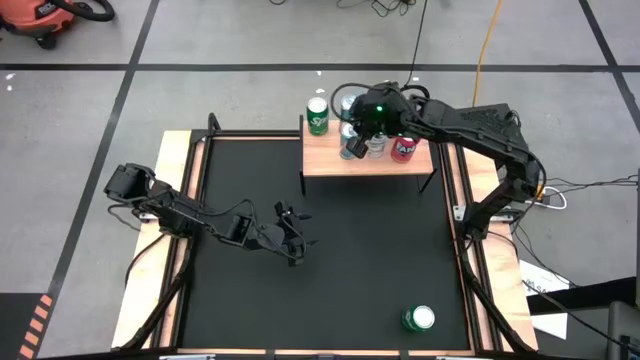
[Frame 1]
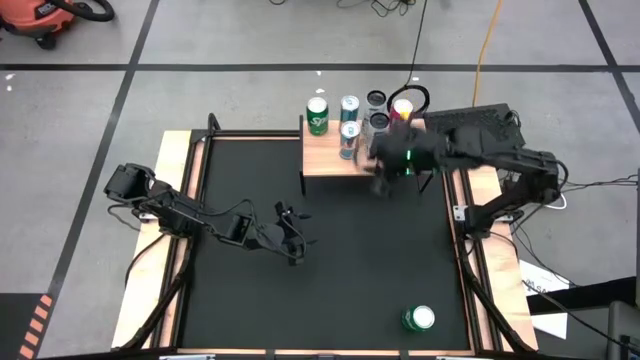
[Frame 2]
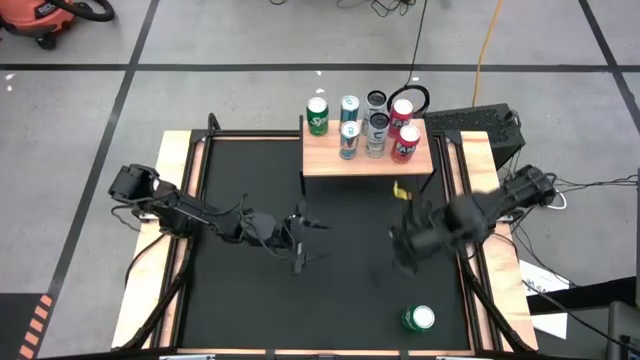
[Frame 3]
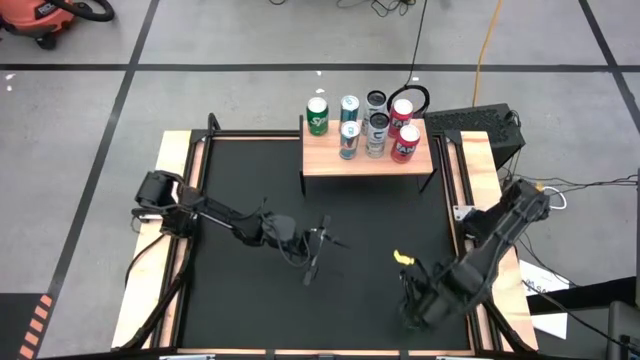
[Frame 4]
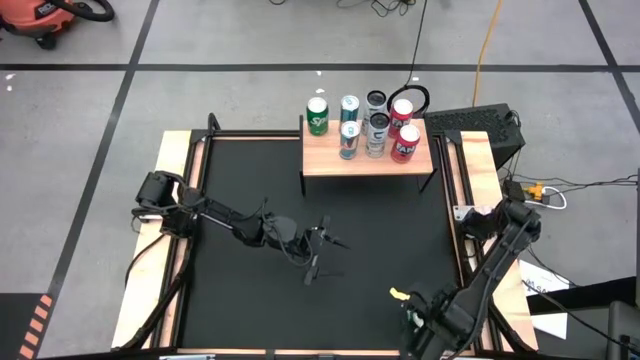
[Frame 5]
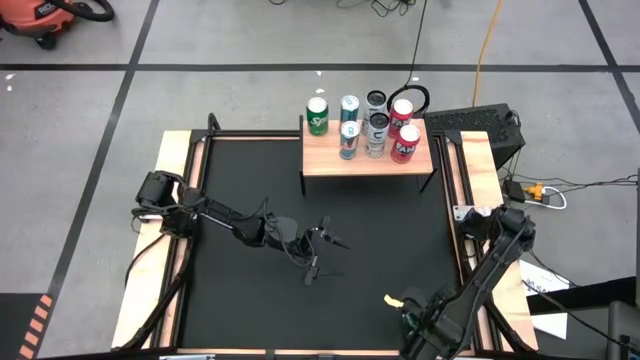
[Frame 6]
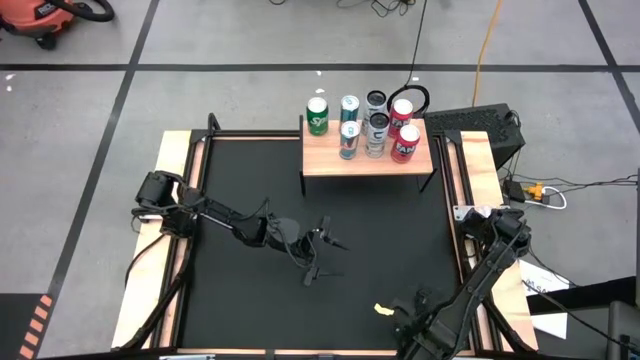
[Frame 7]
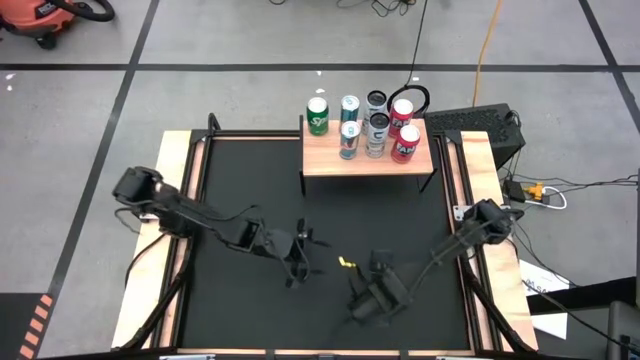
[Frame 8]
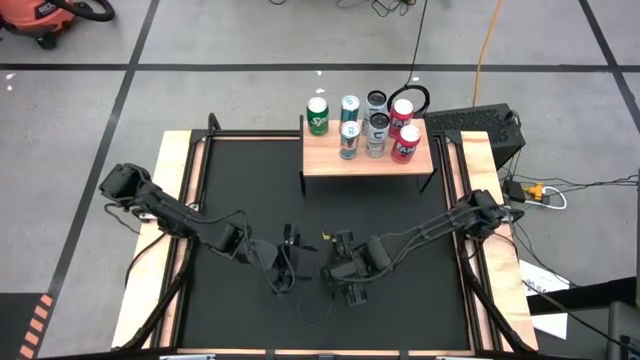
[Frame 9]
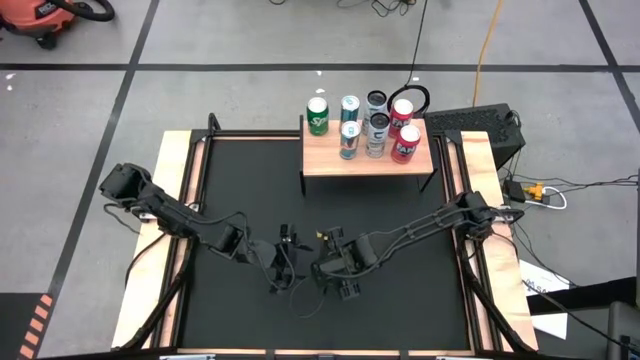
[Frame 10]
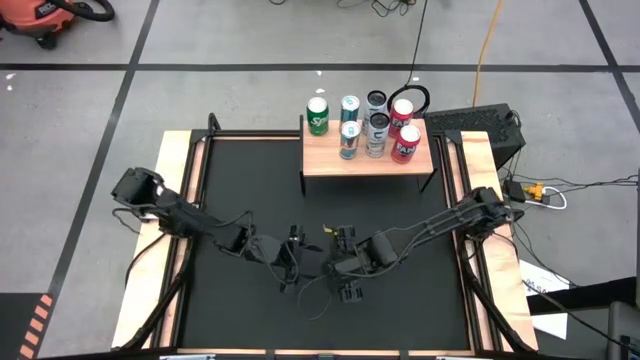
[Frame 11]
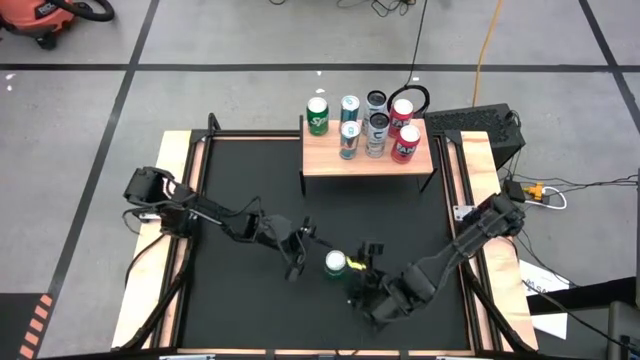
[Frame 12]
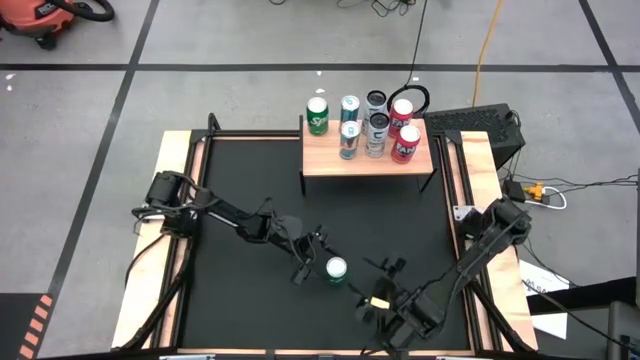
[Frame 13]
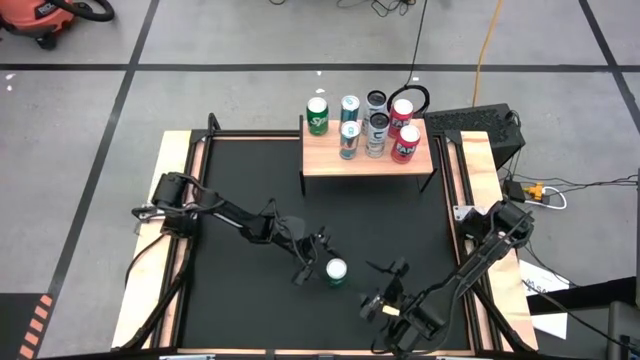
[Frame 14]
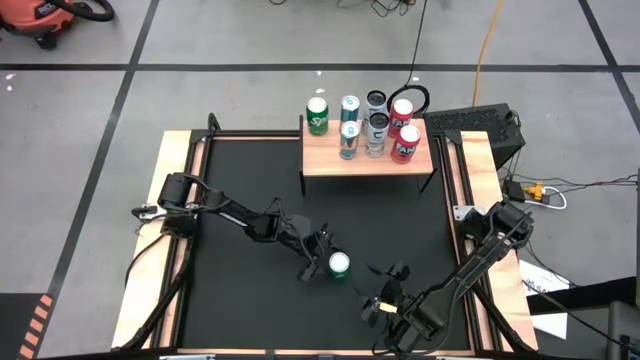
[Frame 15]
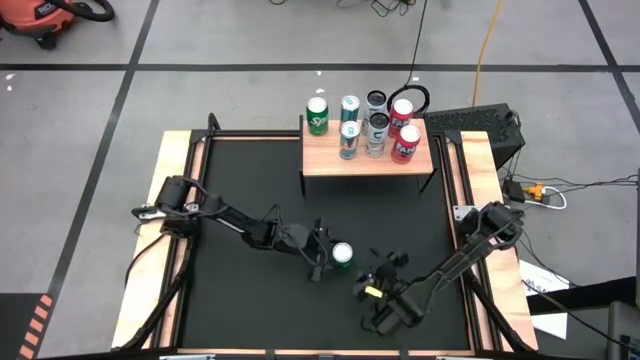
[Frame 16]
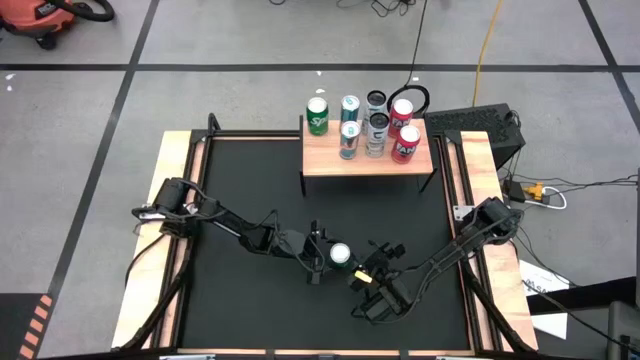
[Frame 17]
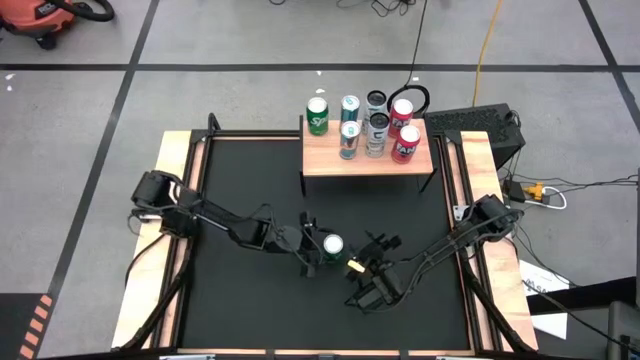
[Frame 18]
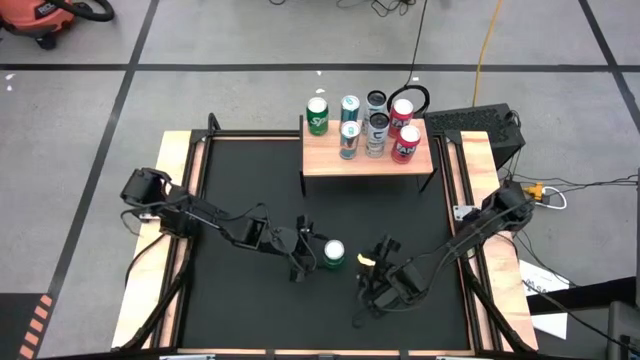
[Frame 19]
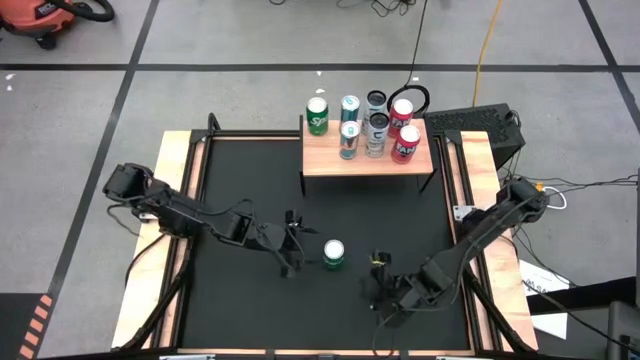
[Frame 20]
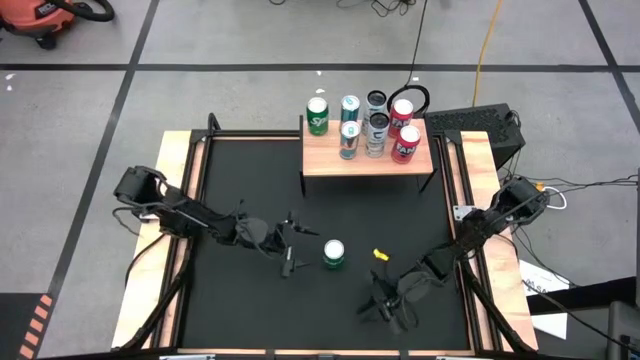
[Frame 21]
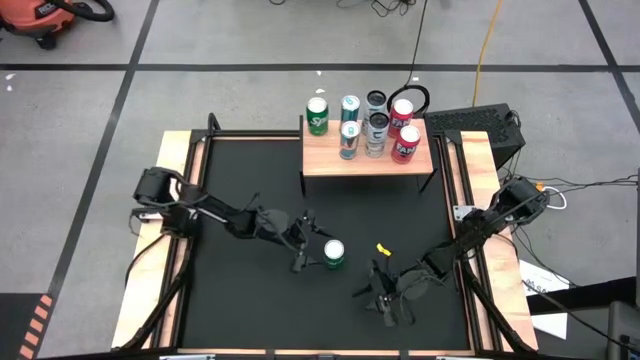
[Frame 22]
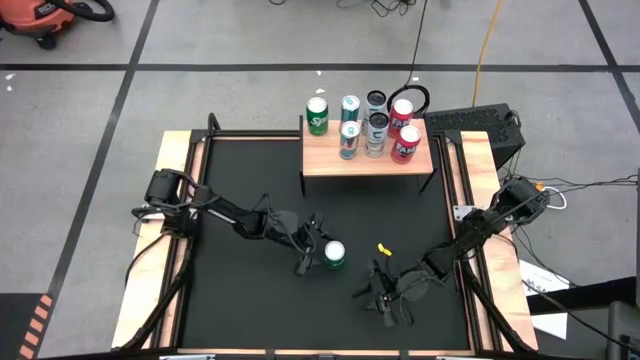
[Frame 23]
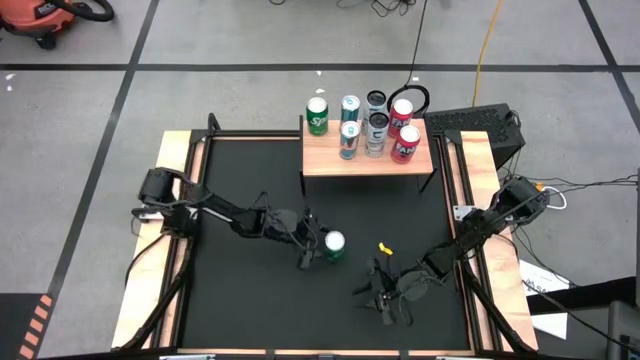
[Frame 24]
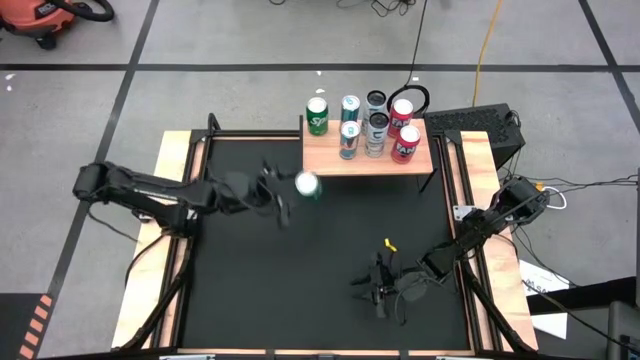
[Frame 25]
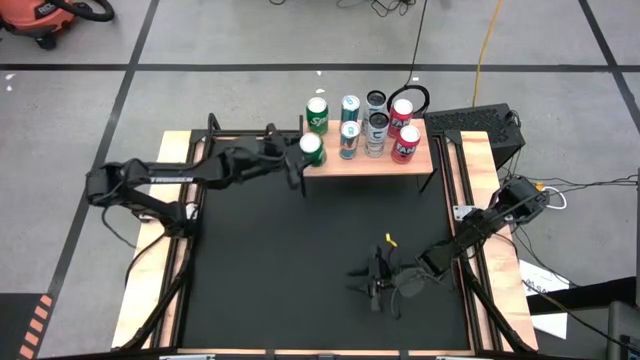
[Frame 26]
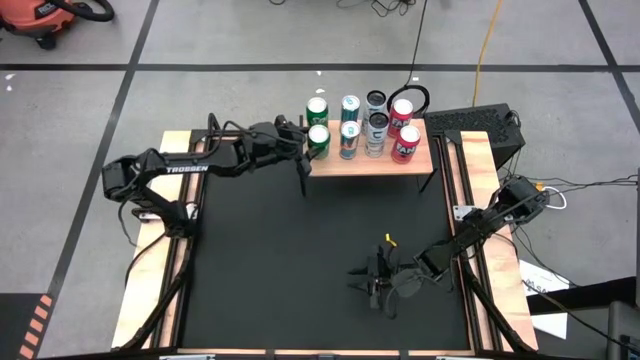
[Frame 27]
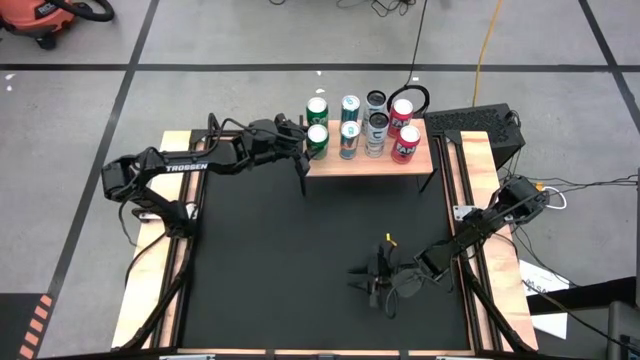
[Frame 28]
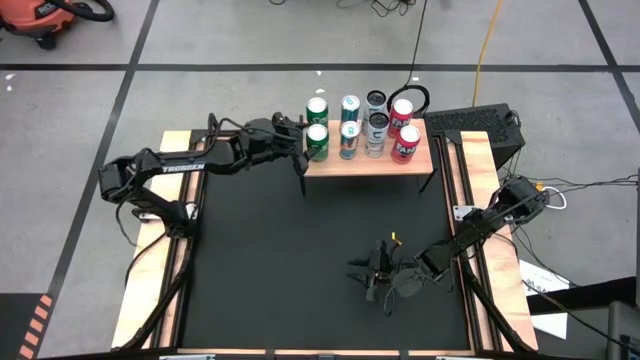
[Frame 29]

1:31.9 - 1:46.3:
Task: Place canned beverage on shelf
Put the green soda can on the shelf aligned with the other green soda can

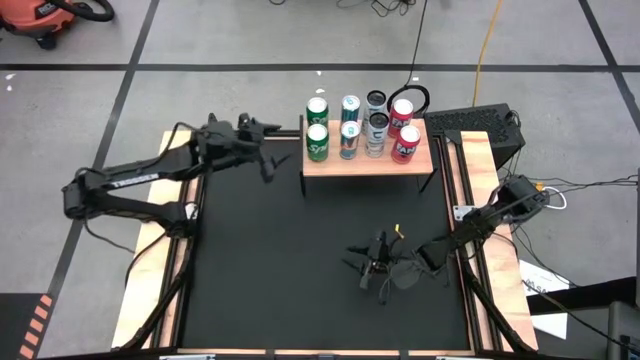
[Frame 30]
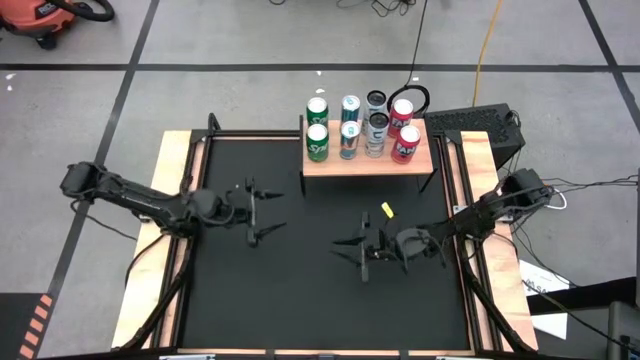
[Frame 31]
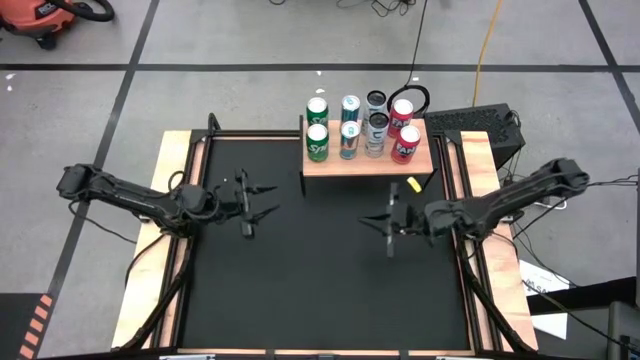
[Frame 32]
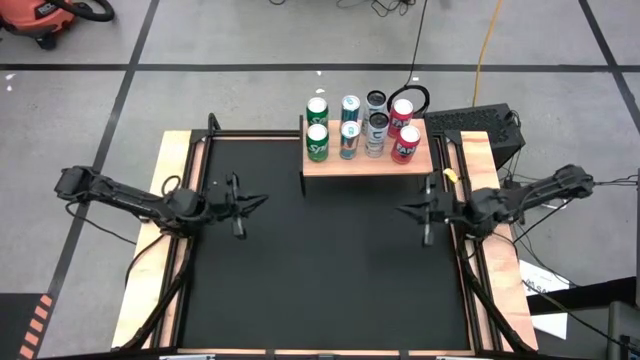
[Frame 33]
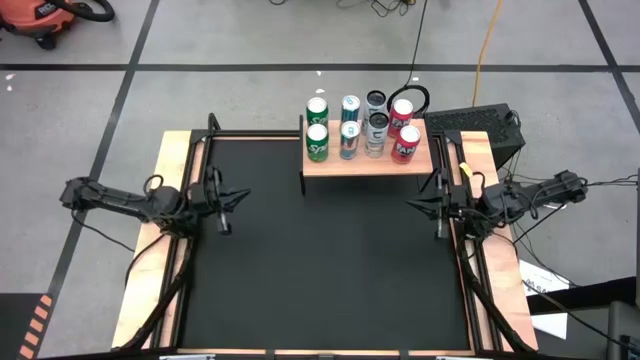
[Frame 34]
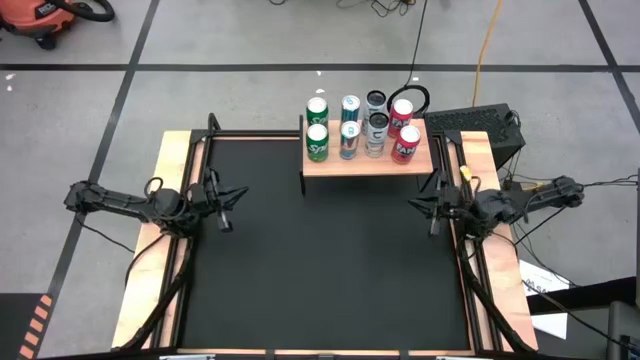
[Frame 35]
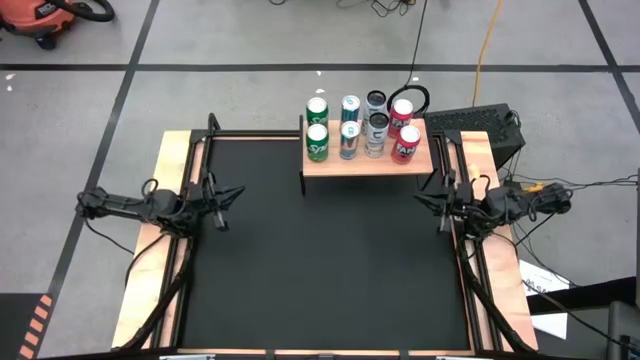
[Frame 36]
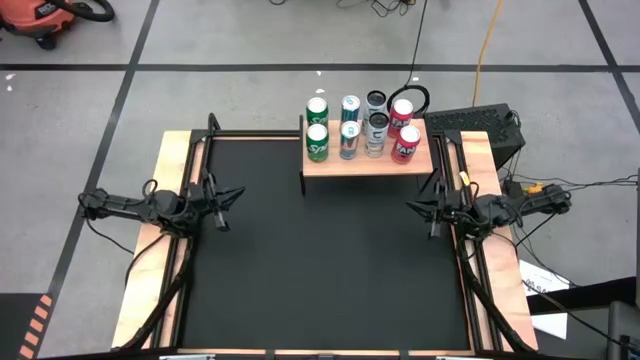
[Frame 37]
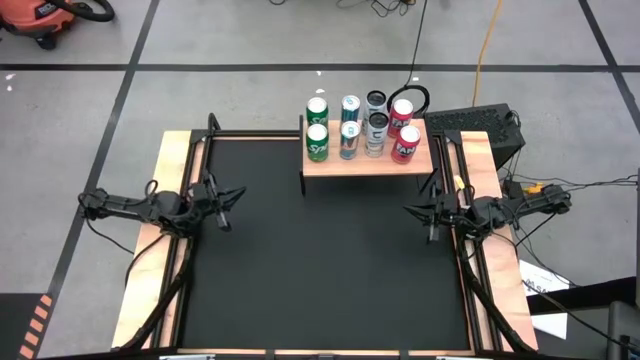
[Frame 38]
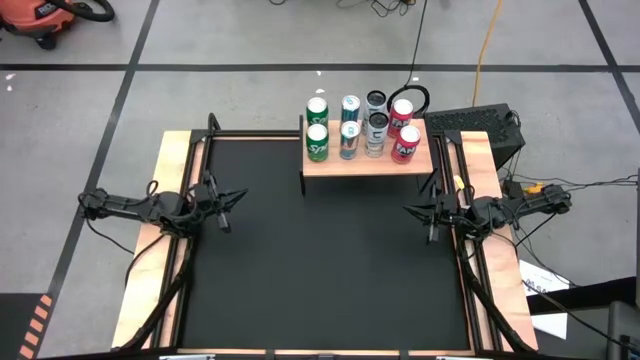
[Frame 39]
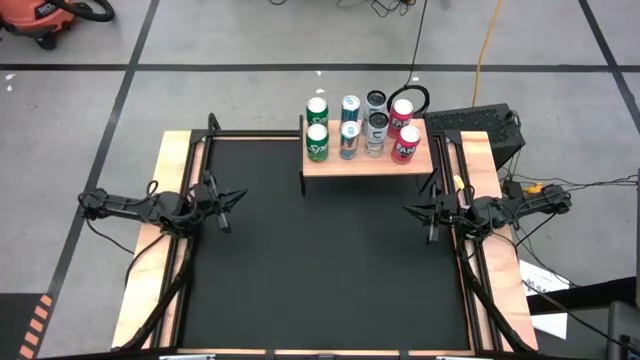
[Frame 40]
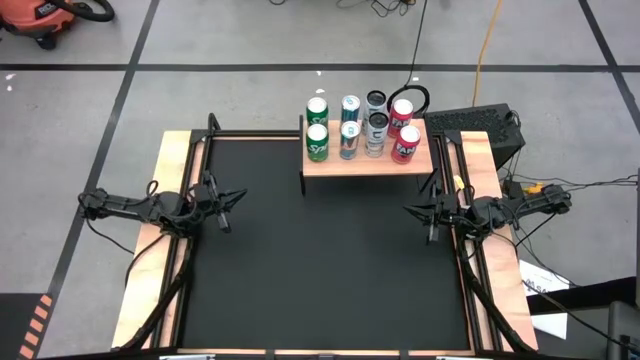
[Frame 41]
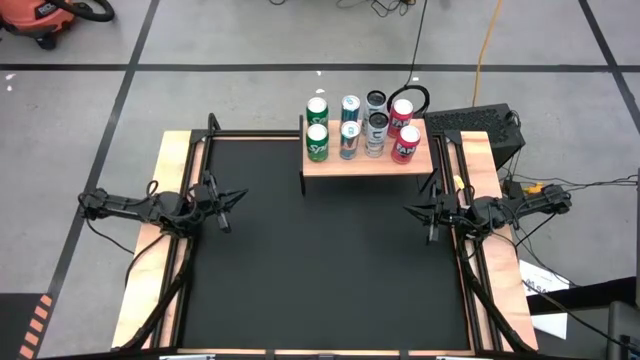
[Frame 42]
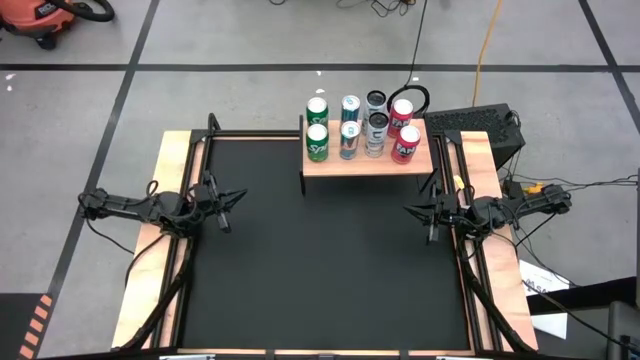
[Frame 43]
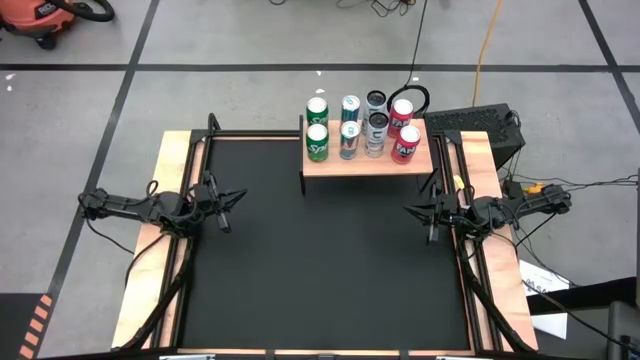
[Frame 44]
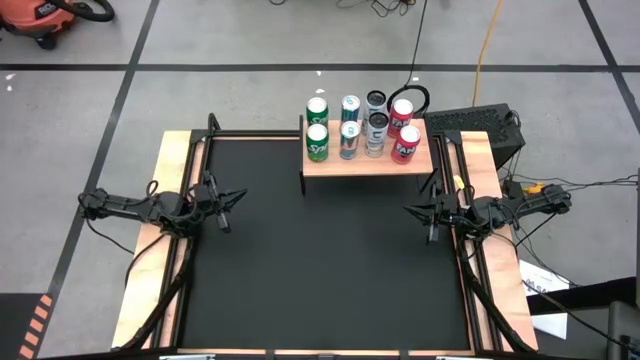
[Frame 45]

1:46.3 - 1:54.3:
Return to Home Position
